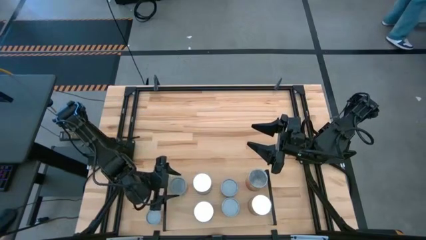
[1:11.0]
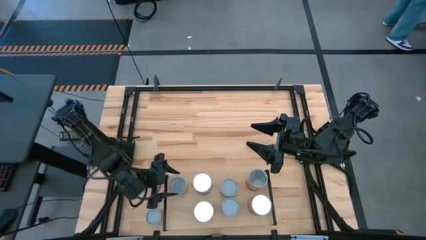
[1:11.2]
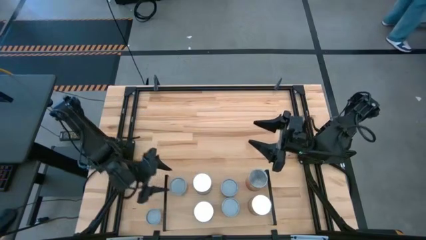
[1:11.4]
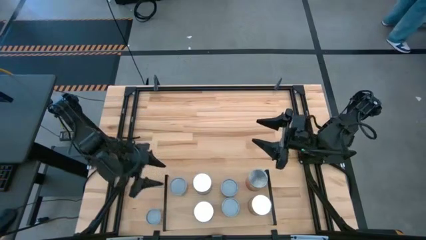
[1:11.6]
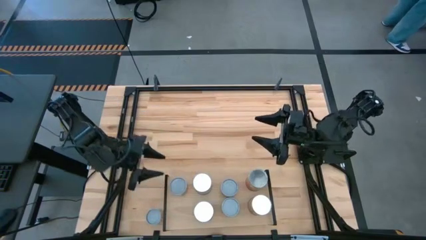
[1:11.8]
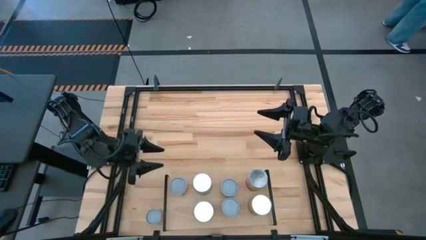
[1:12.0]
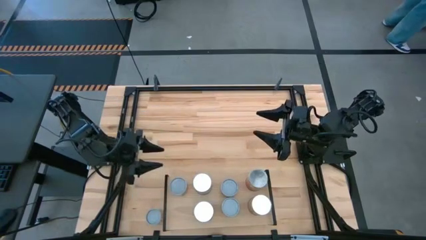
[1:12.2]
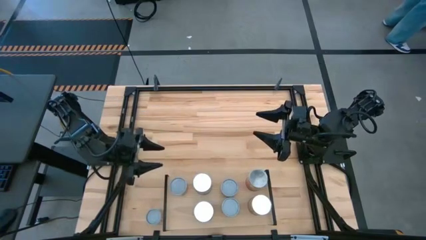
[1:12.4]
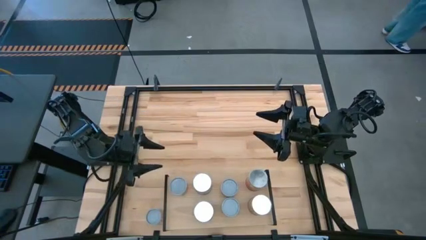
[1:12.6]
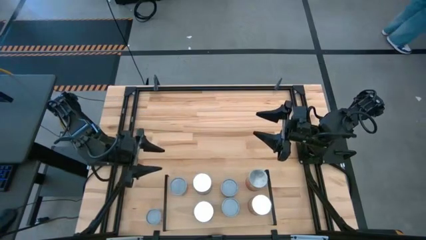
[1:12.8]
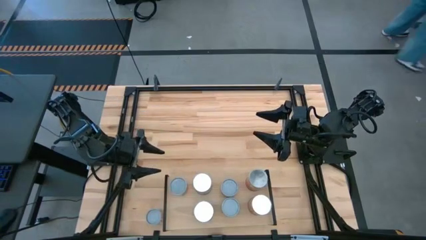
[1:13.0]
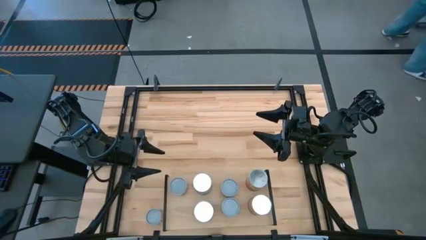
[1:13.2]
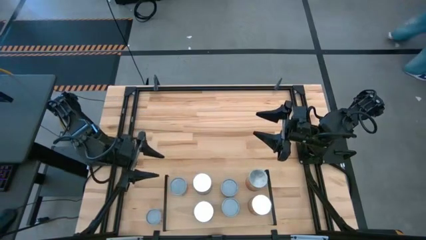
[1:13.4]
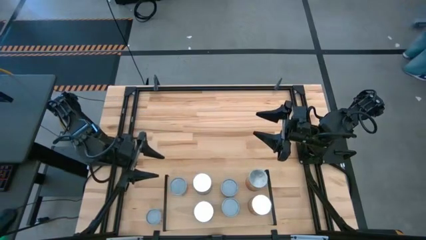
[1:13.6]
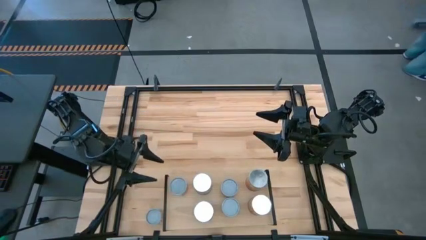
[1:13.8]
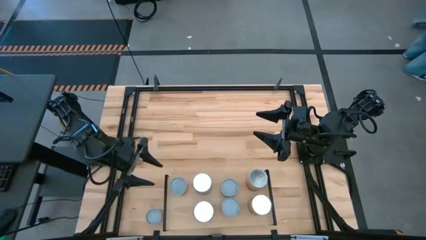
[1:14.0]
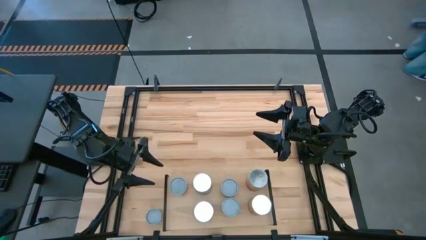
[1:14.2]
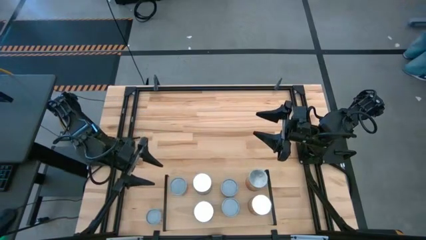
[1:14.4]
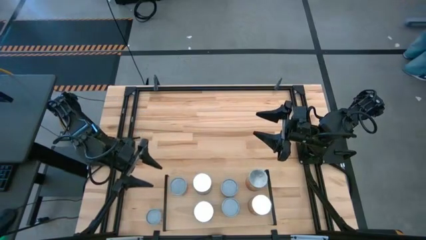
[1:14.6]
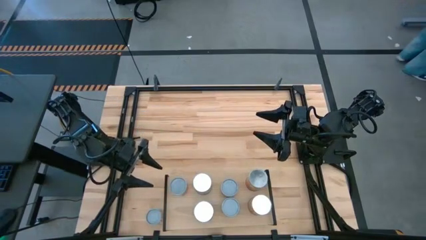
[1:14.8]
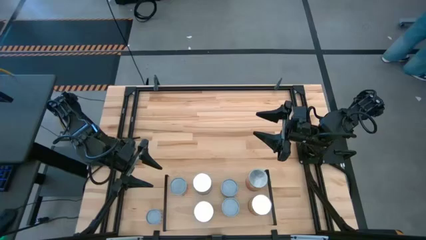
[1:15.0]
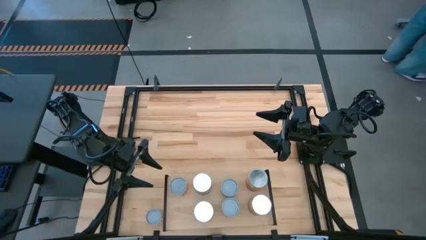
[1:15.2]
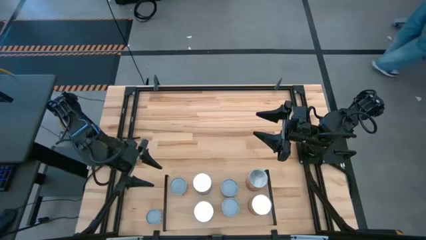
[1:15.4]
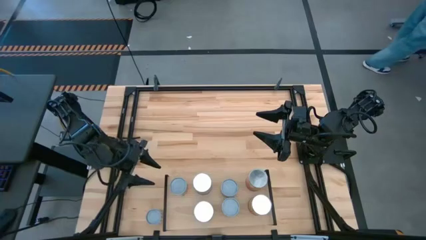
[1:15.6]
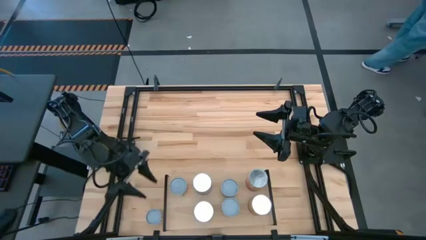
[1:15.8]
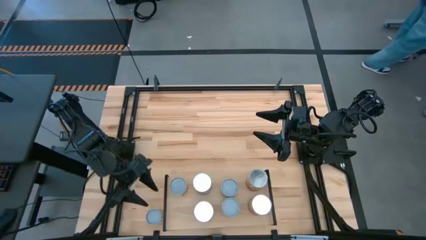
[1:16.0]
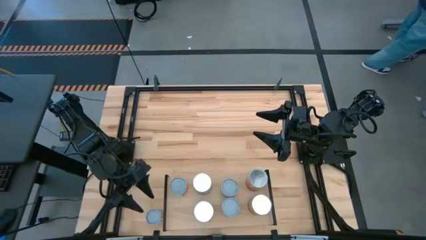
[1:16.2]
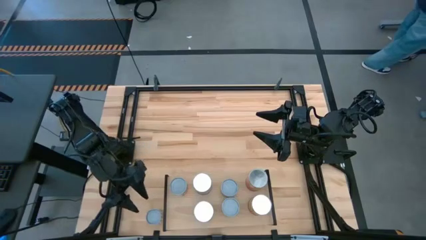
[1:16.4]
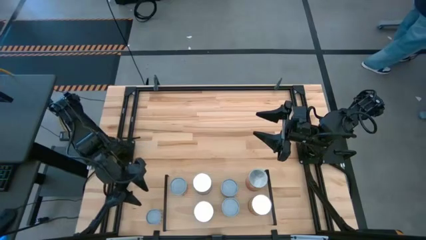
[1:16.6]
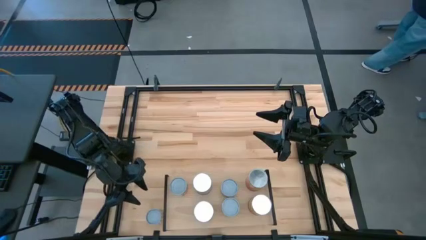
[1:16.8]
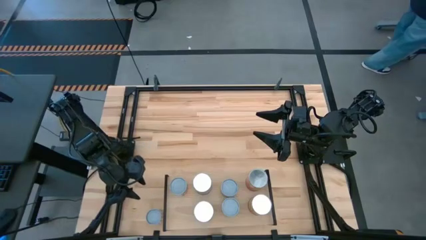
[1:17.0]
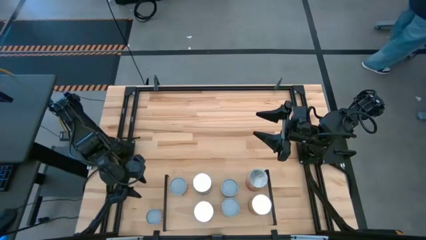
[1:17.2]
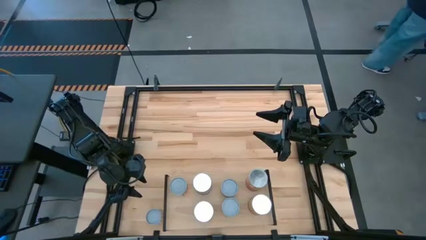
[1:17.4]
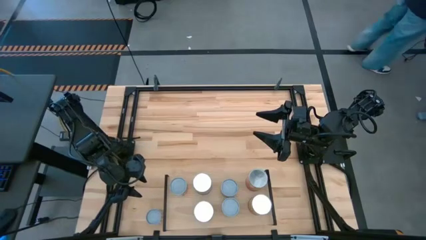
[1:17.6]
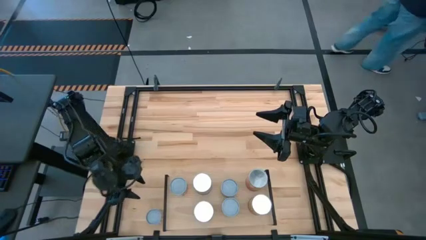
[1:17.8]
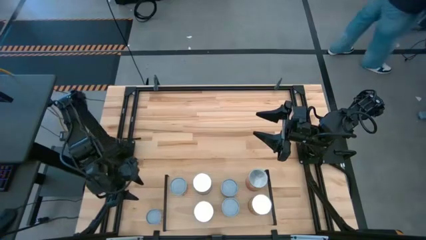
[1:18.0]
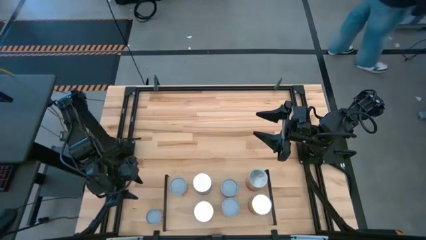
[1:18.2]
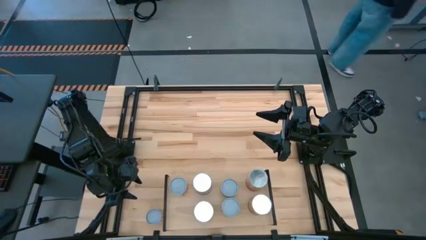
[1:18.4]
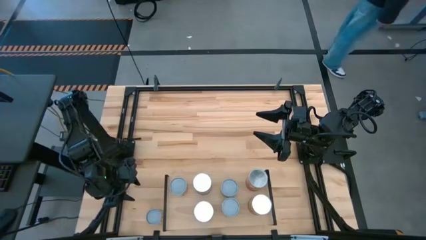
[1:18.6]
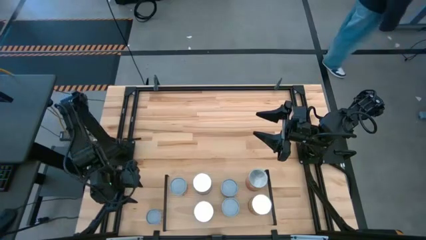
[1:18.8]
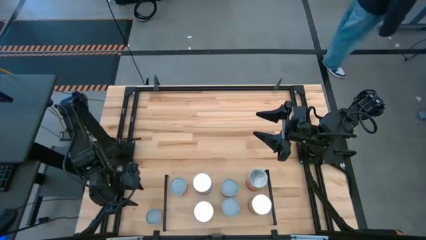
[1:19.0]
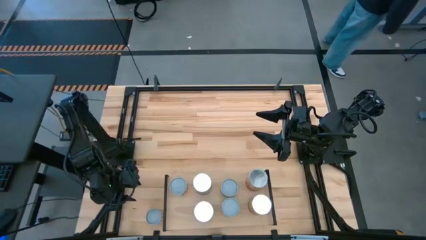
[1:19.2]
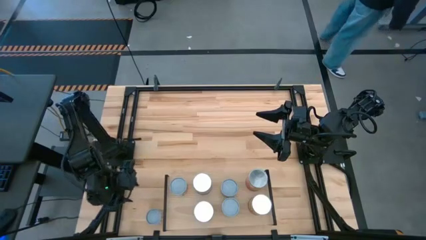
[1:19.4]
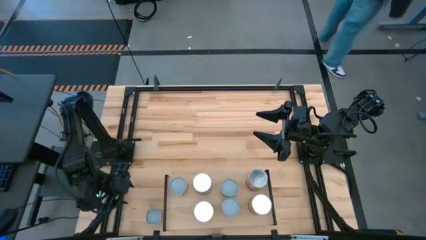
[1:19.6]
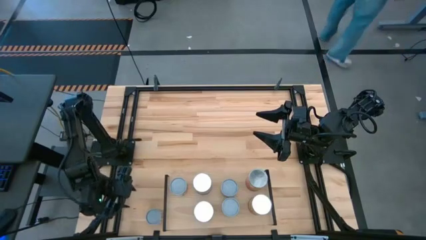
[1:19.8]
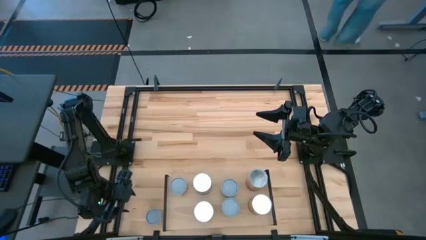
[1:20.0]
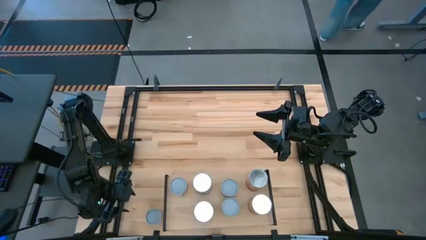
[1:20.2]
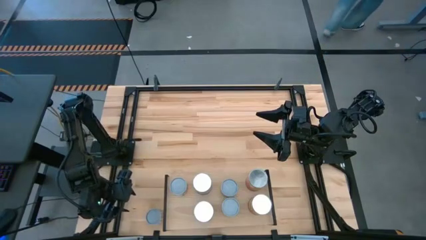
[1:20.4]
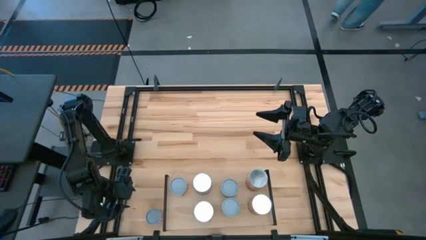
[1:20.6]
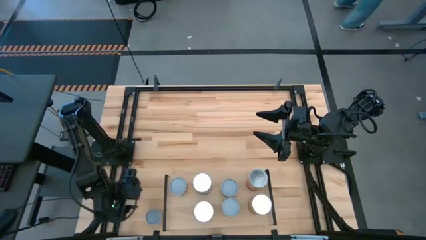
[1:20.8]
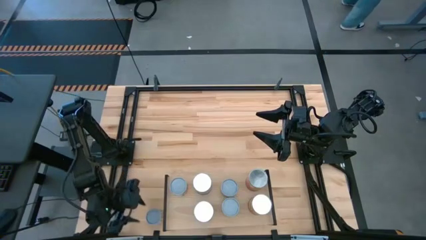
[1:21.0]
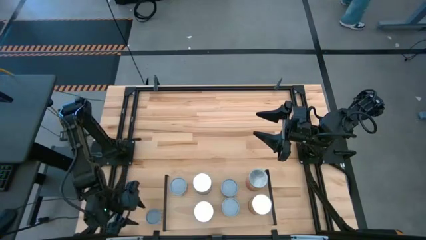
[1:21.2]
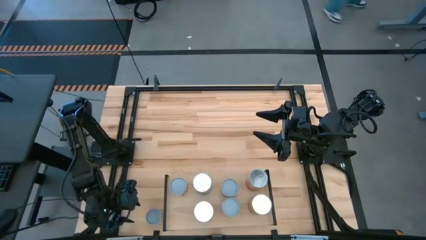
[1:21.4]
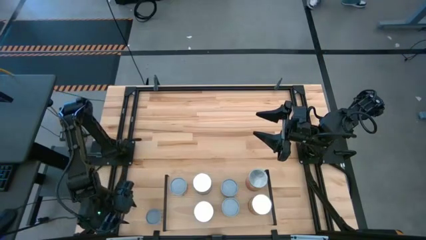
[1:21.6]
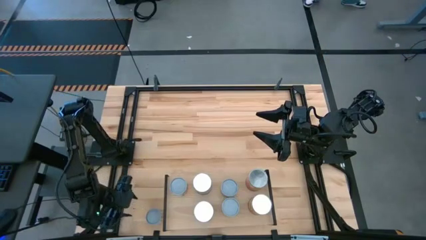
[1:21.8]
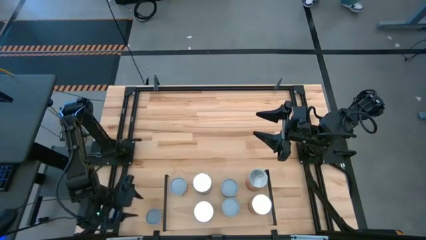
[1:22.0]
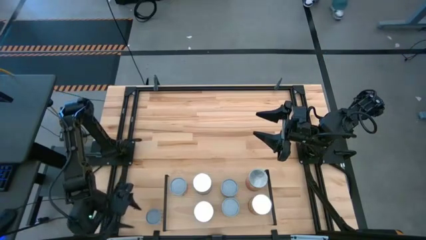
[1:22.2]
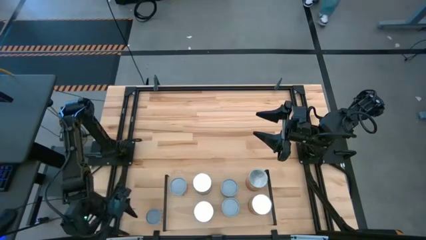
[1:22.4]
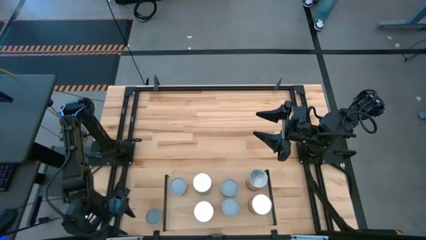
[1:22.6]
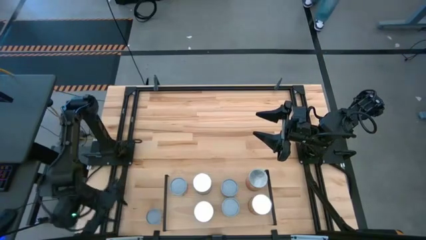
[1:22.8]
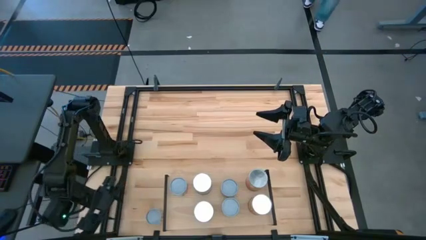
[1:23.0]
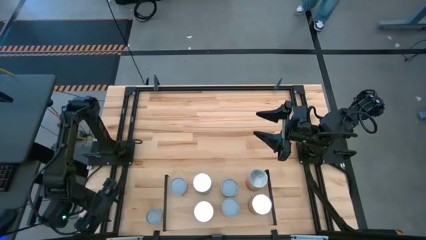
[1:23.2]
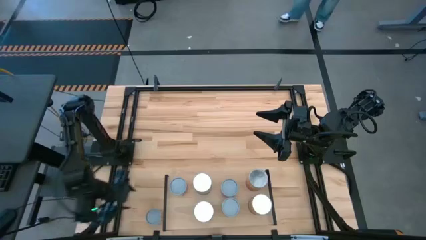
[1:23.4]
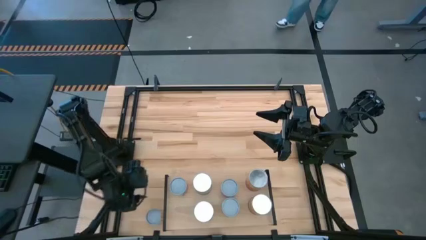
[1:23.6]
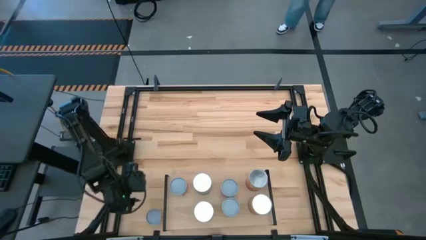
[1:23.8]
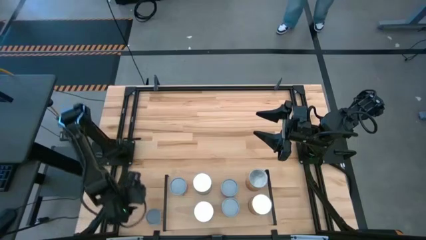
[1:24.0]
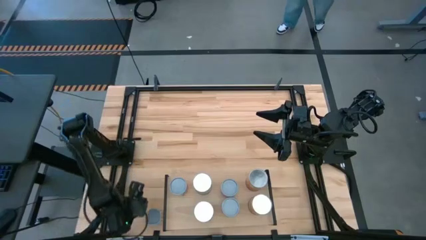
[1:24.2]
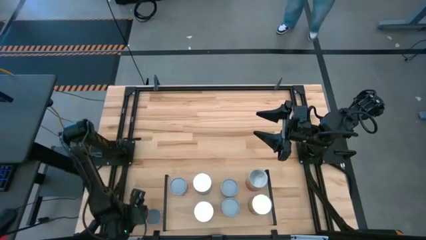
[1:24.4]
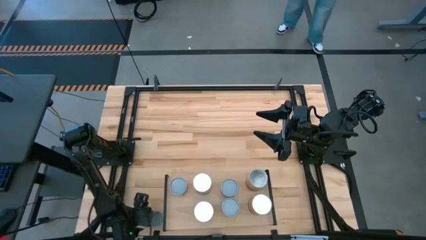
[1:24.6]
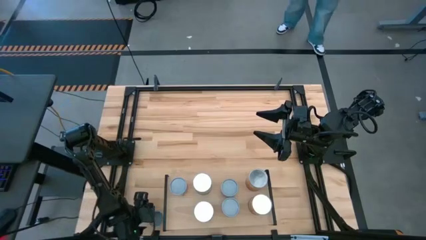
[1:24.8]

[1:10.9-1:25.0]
Task: Pick and place cans onto a shelf
Put the small canned carrots on the shelf
